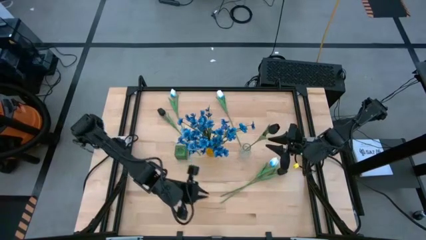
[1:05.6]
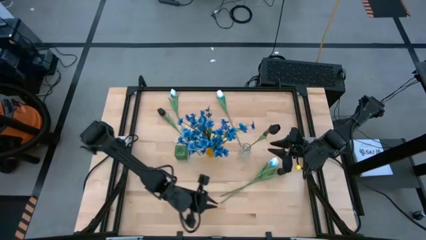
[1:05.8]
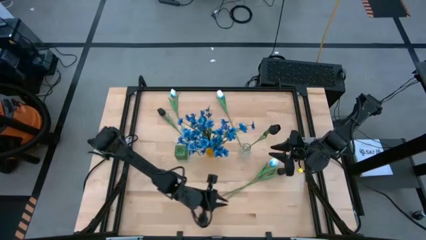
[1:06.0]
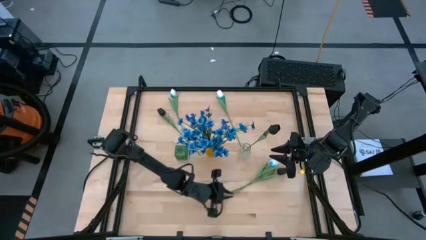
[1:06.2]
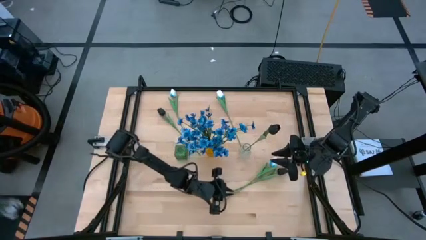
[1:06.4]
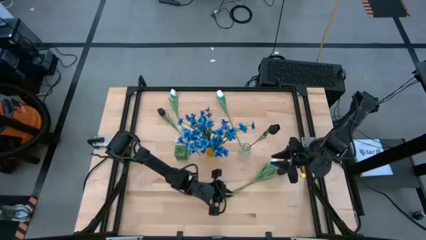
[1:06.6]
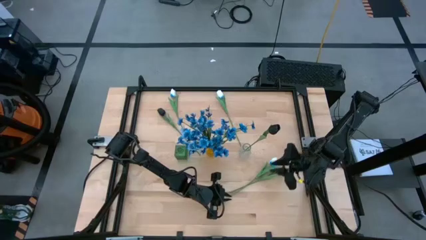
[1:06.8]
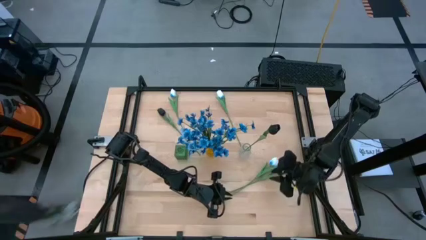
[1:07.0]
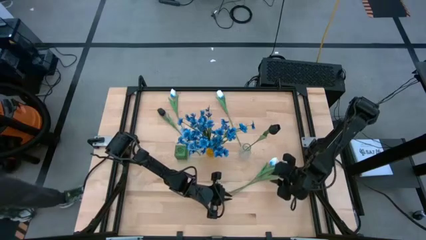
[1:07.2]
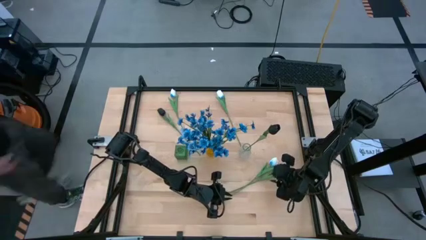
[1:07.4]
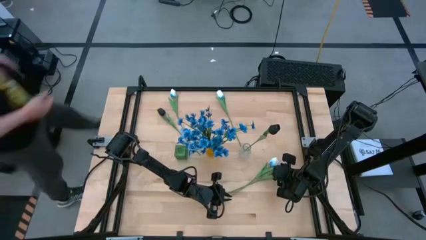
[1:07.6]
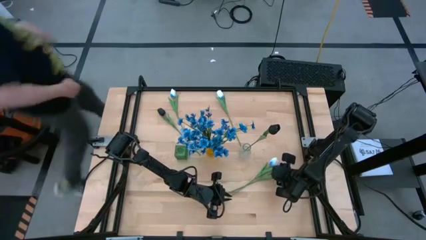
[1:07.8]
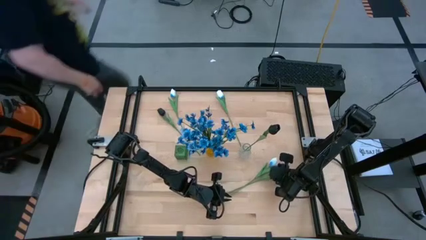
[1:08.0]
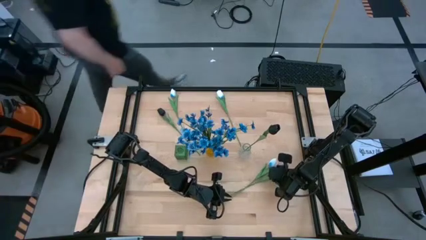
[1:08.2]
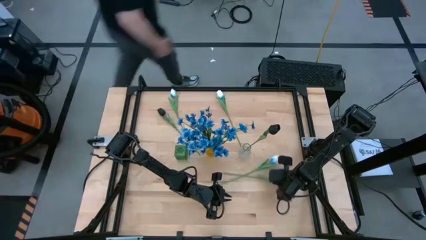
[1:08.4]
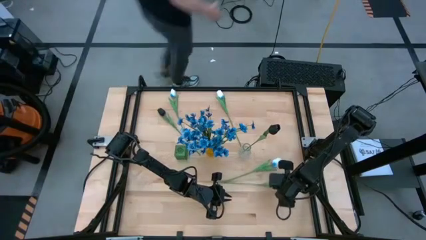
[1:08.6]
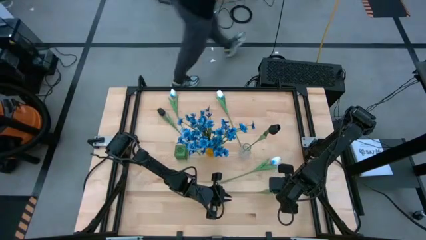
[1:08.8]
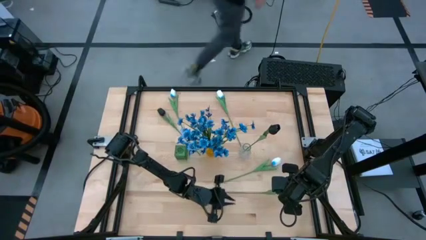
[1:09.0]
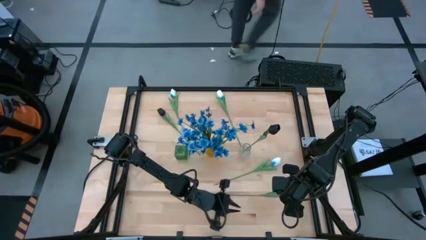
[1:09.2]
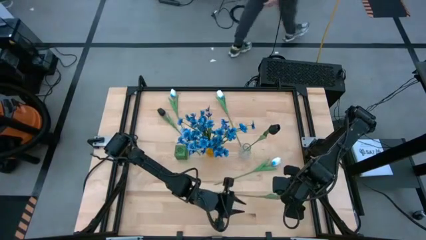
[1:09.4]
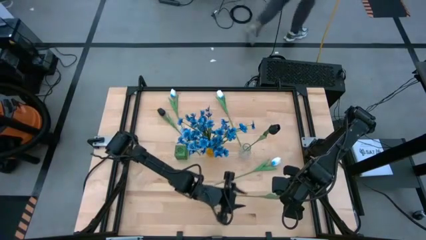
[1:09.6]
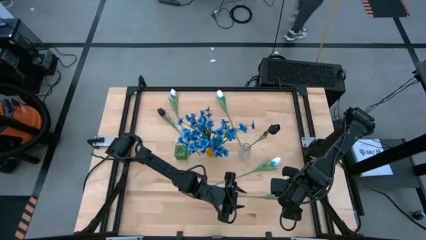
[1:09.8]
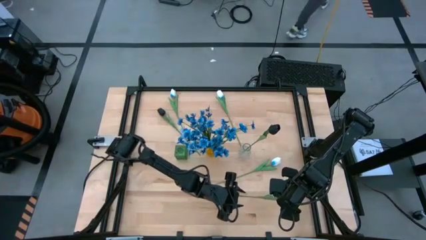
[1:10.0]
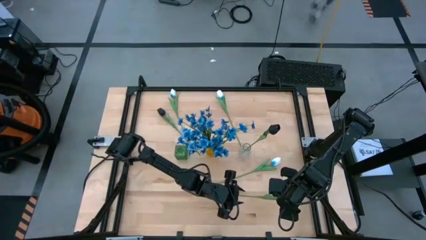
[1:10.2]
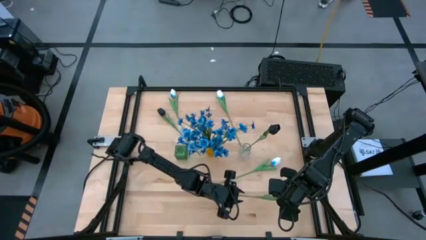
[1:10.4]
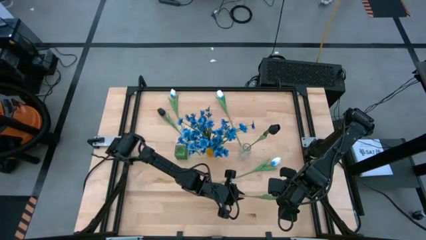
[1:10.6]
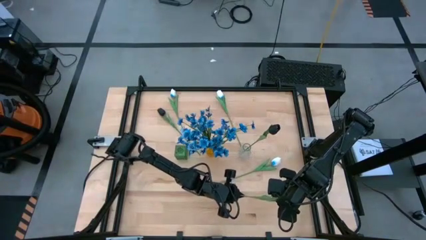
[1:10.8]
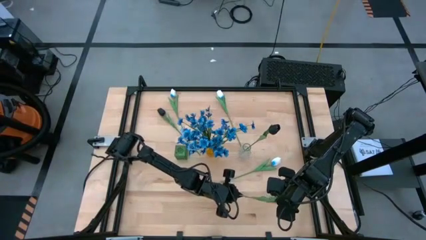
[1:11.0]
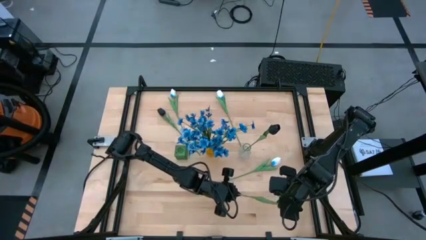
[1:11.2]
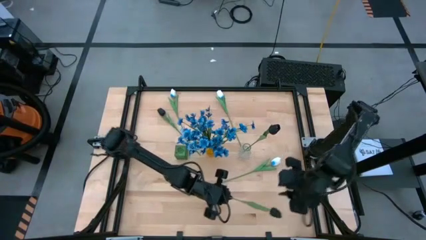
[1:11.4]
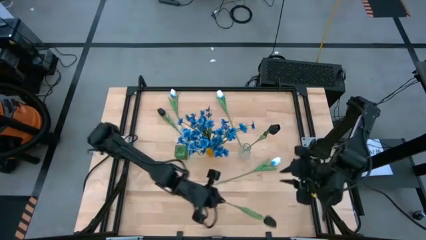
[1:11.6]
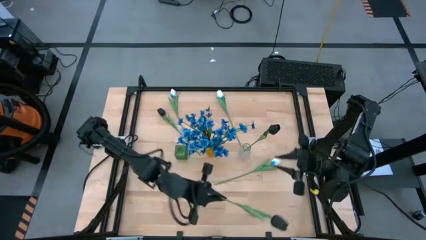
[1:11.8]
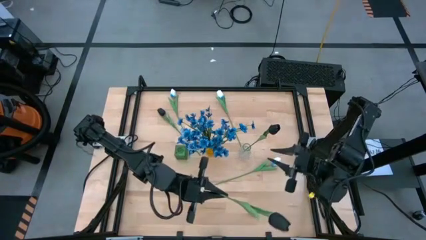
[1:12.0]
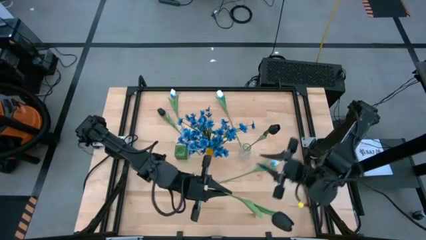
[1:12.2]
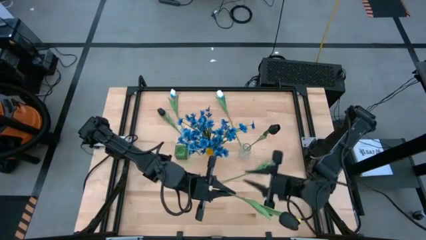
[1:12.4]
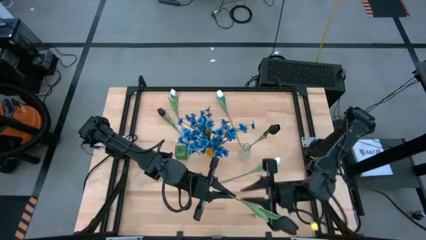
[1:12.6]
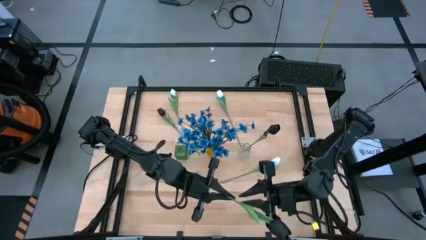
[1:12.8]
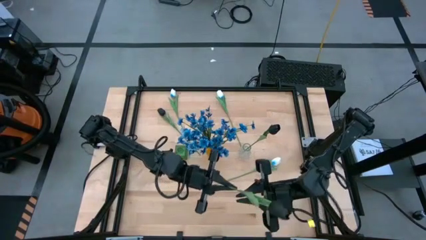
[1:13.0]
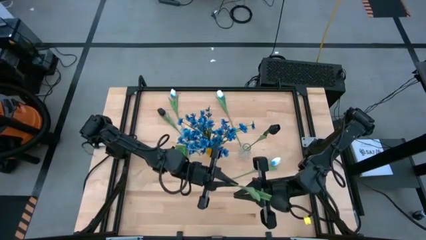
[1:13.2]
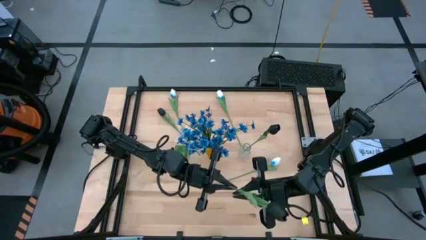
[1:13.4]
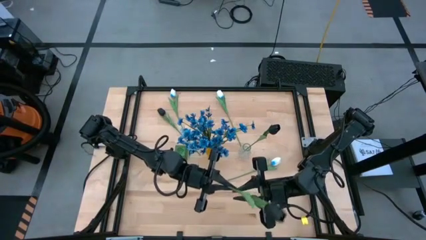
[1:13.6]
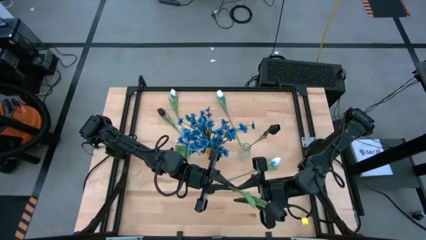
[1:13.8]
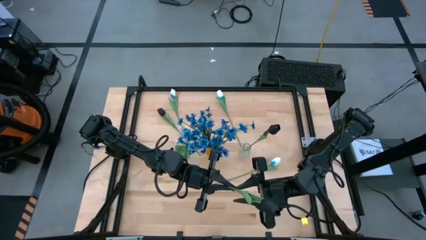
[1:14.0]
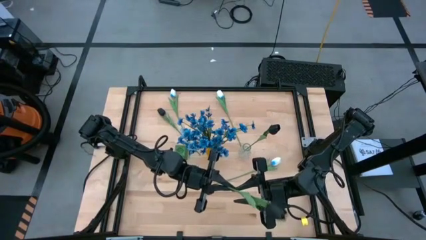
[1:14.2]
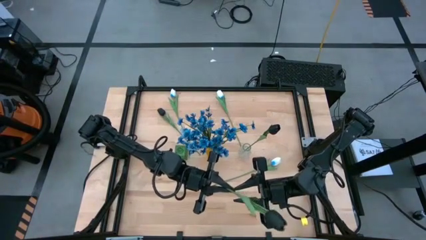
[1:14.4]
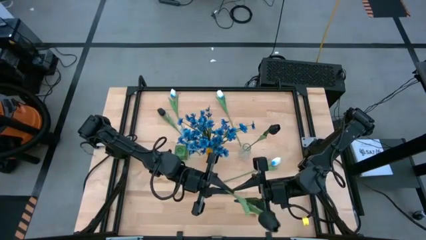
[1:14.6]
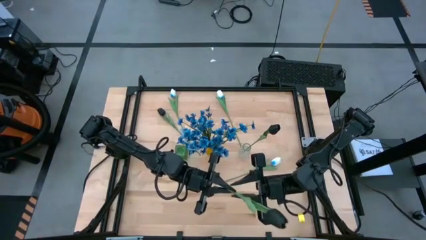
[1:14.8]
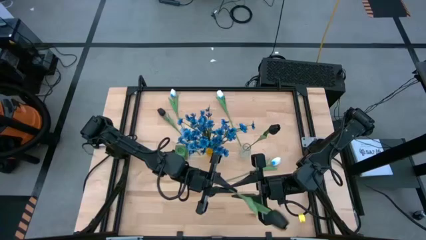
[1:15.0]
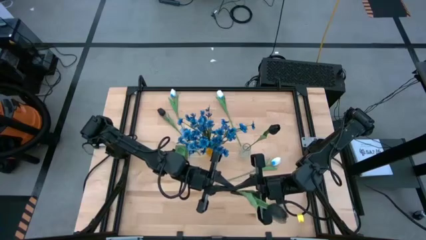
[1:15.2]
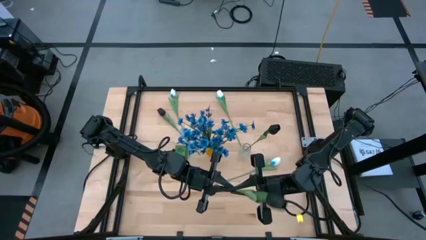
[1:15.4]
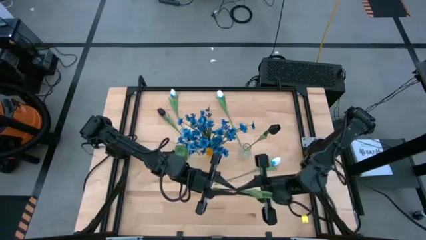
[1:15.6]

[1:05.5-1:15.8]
Task: Sort flowers into vase by color
Put the bottom black flower into the transparent vase

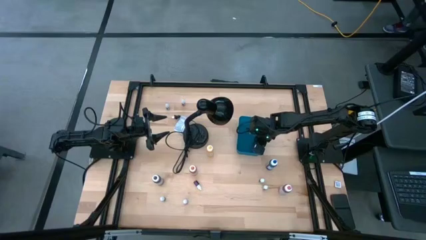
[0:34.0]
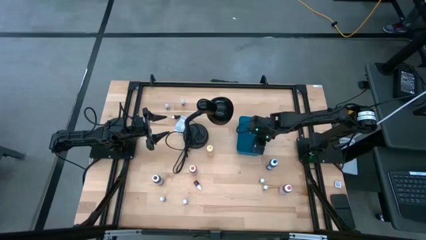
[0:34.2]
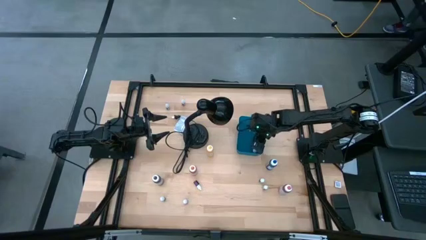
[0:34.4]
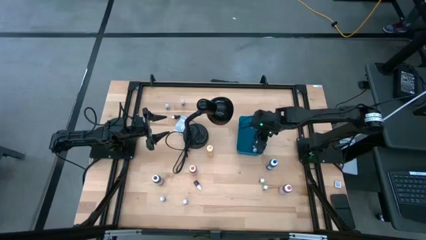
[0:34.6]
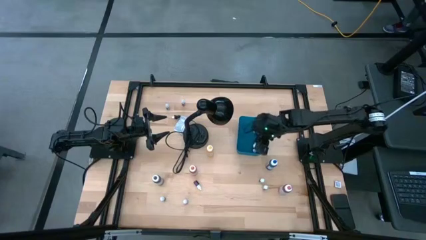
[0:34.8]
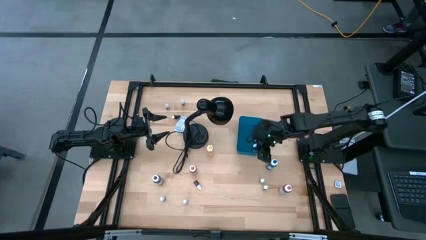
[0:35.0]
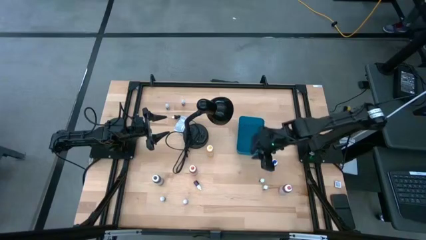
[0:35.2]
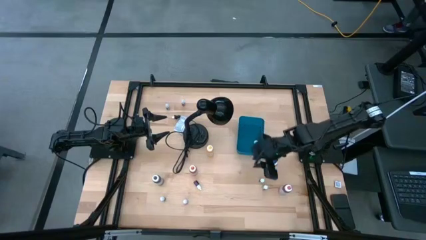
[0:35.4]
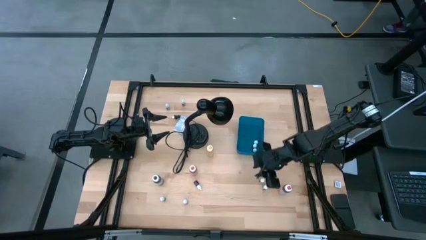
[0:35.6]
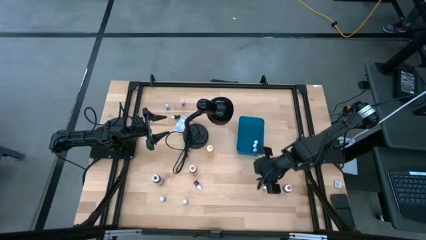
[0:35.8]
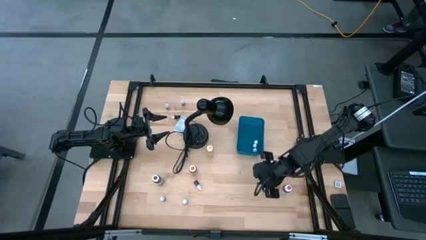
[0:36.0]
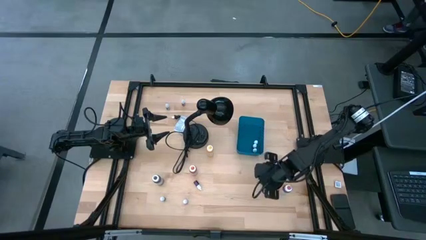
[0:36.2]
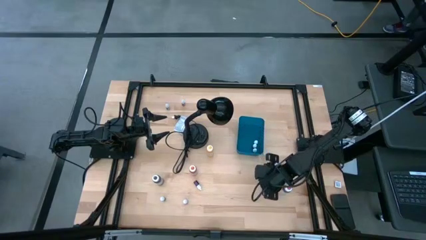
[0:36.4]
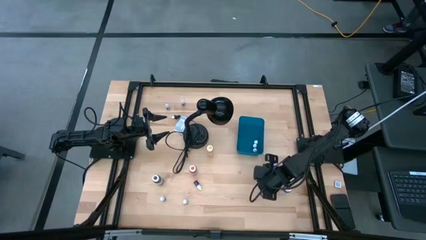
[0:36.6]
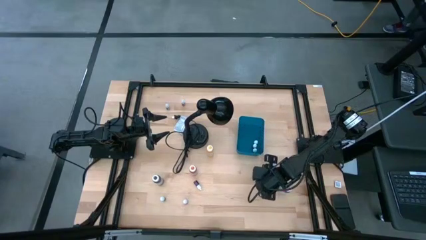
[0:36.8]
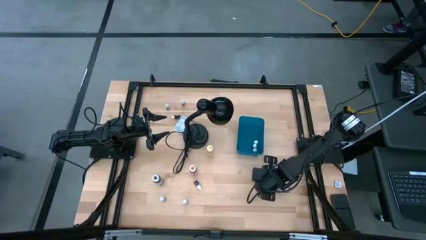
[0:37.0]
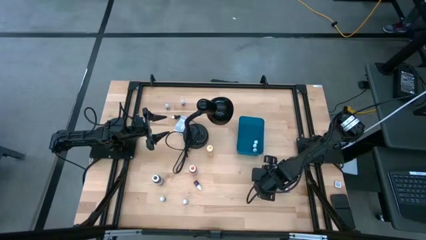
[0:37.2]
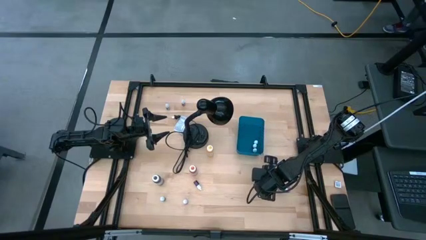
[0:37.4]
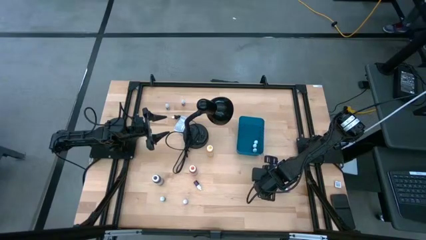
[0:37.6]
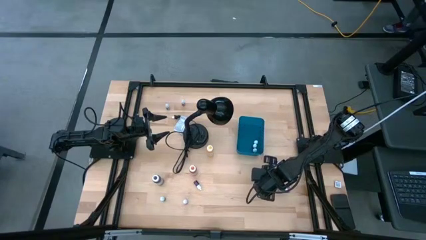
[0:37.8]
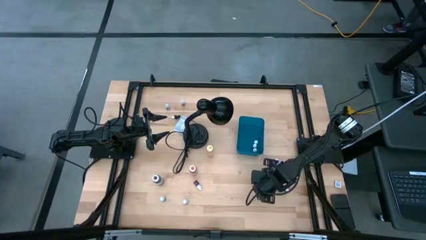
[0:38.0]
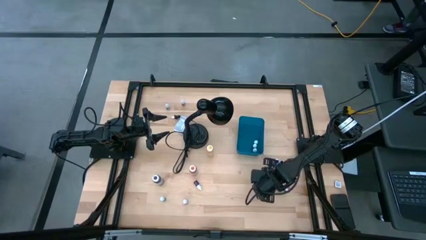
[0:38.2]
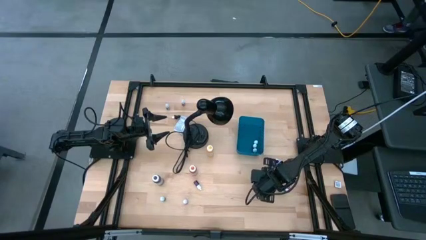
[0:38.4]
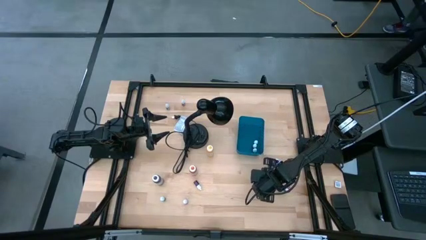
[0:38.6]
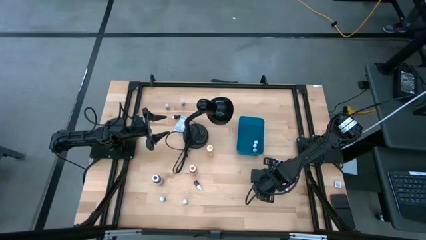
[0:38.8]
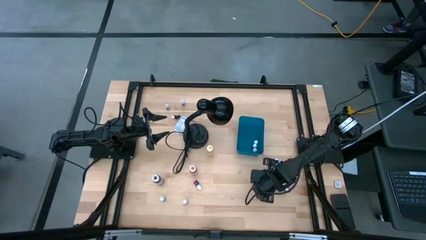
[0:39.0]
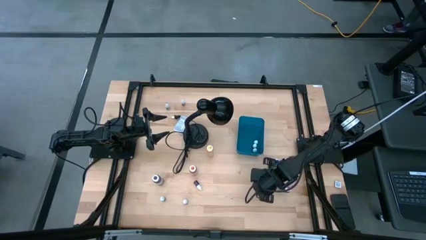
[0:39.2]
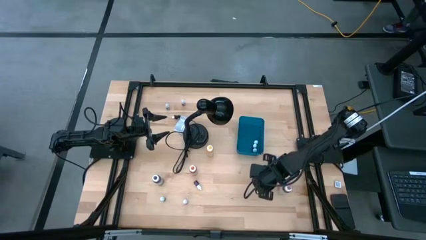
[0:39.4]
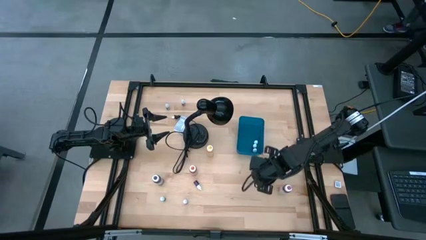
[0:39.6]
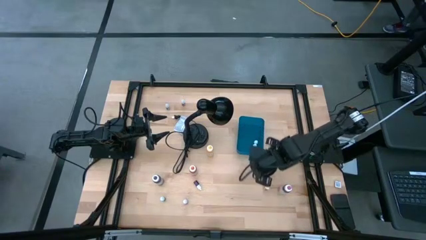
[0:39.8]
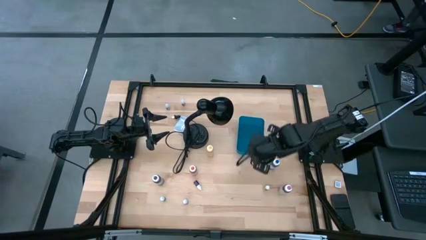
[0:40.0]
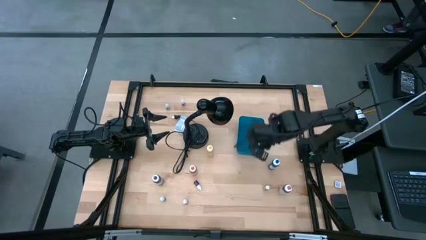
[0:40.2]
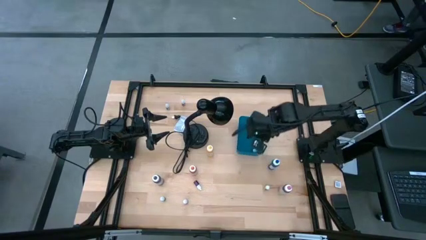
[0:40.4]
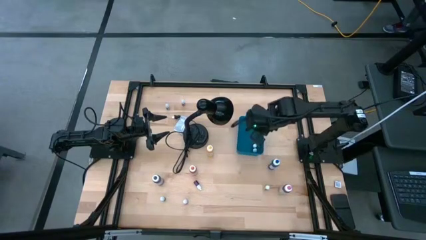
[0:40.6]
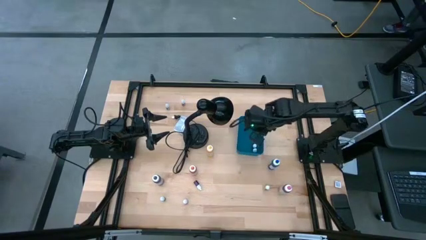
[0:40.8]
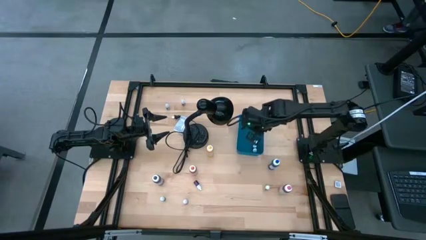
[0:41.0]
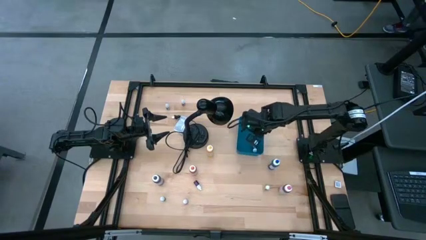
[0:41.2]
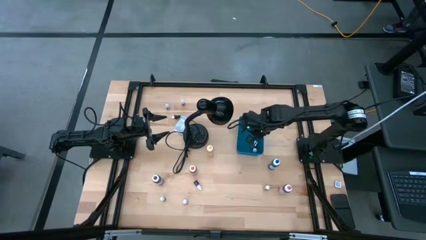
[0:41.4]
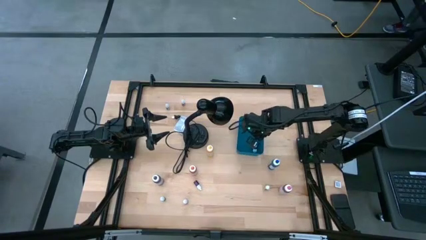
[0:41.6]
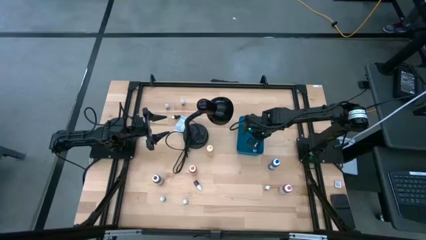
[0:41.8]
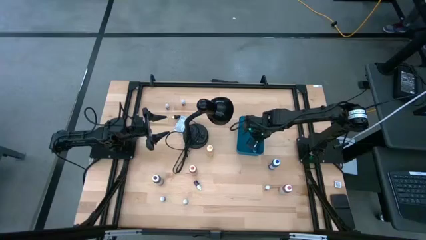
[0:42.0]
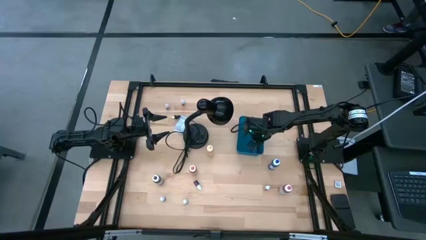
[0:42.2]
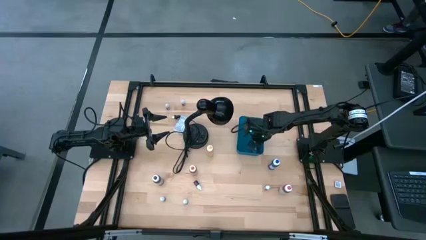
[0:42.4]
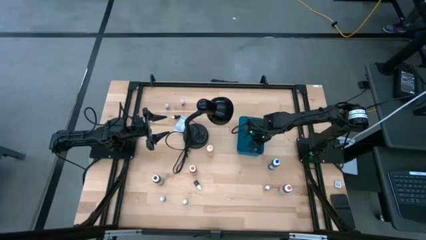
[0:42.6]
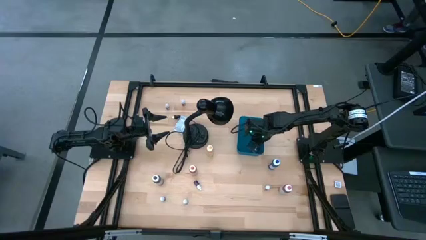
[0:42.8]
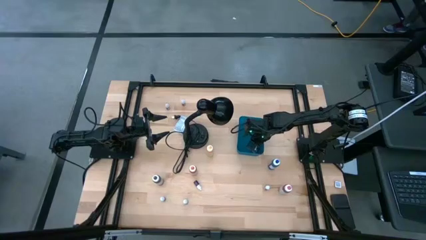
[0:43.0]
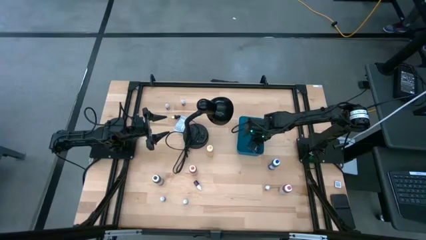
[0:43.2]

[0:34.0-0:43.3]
Task: Pick & Place food coloring
Put the small black food coloring bottle into the blue bin
